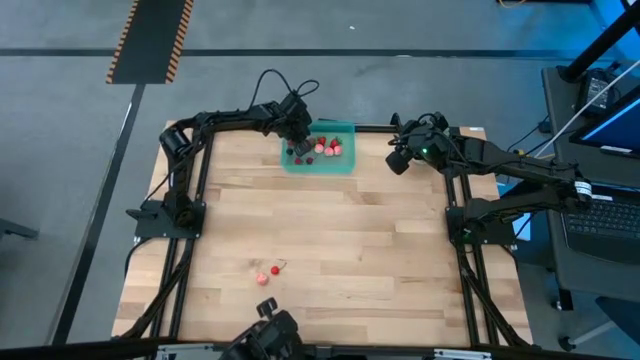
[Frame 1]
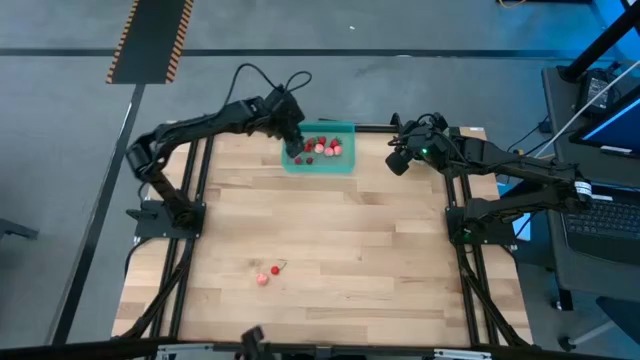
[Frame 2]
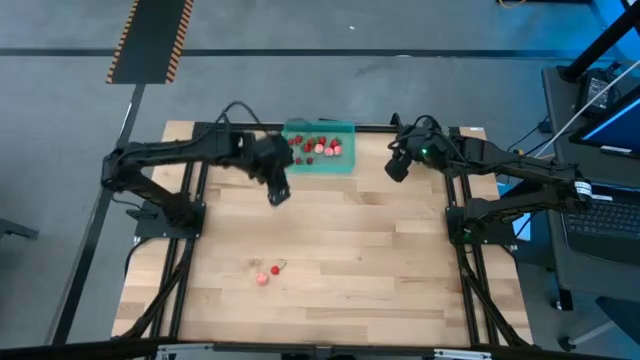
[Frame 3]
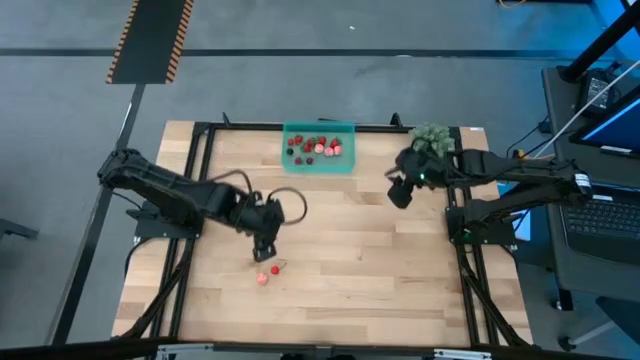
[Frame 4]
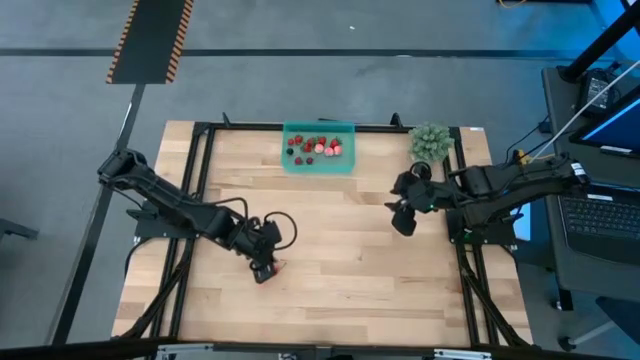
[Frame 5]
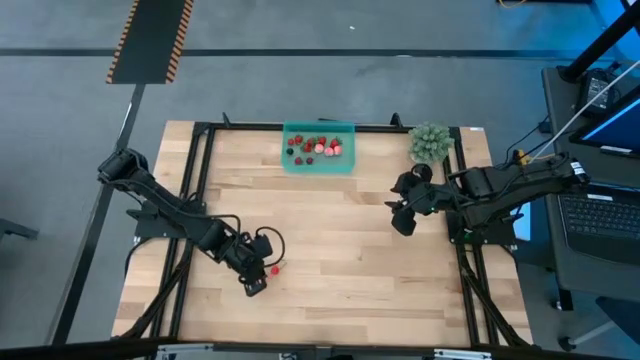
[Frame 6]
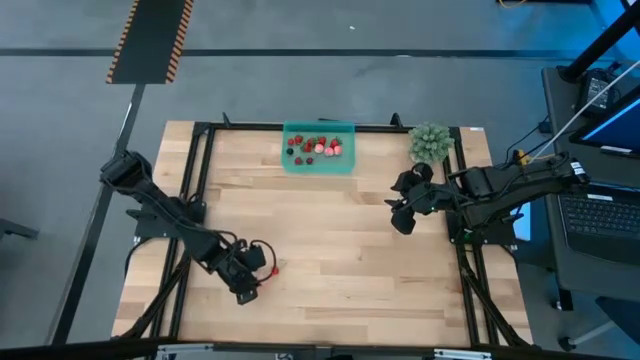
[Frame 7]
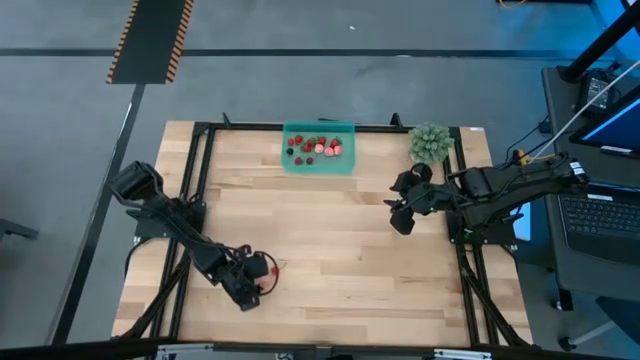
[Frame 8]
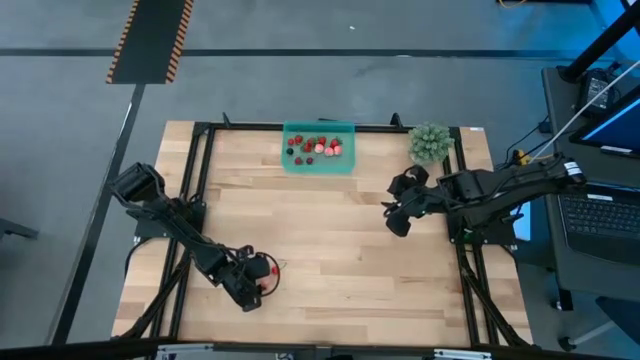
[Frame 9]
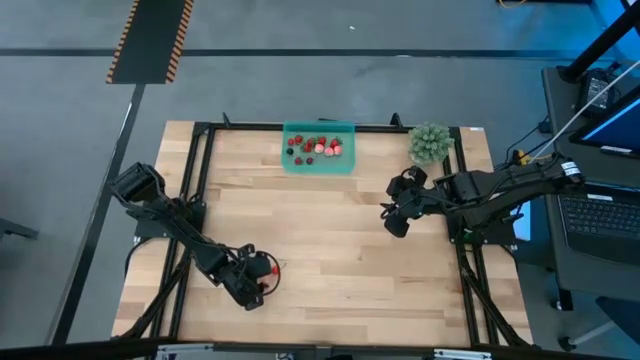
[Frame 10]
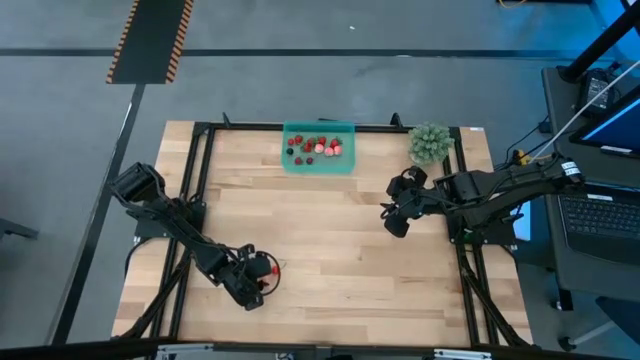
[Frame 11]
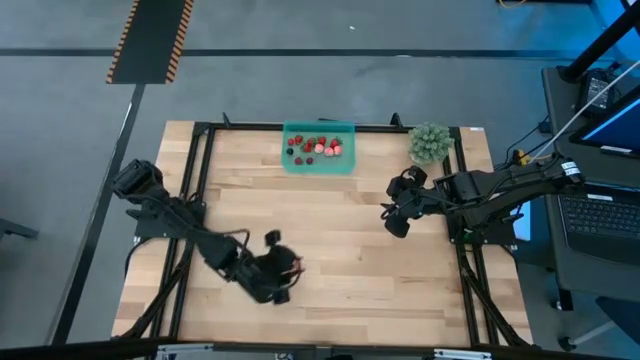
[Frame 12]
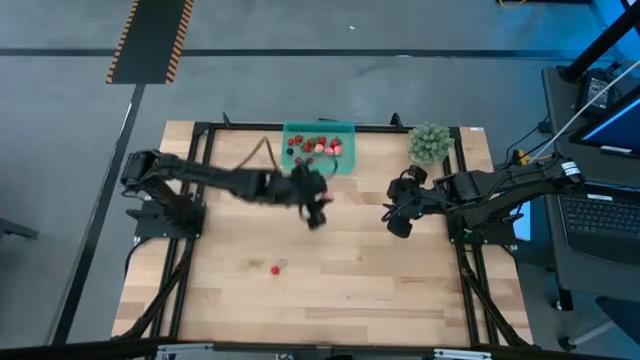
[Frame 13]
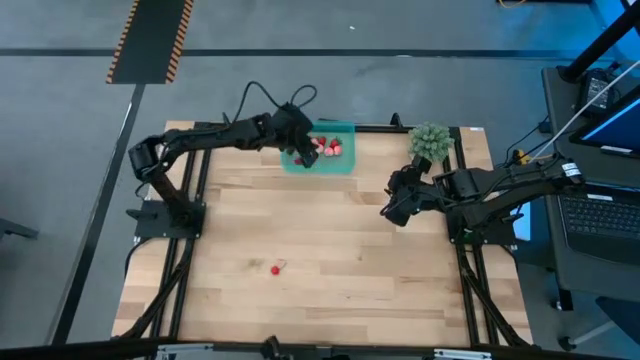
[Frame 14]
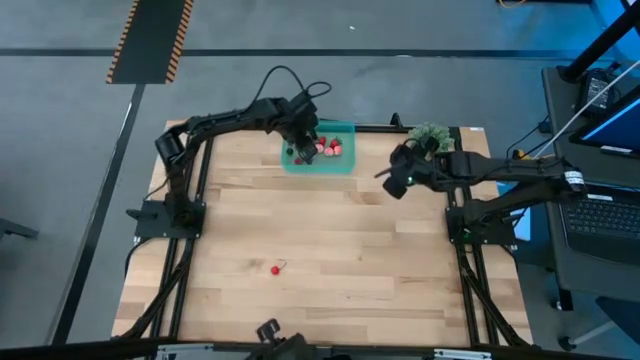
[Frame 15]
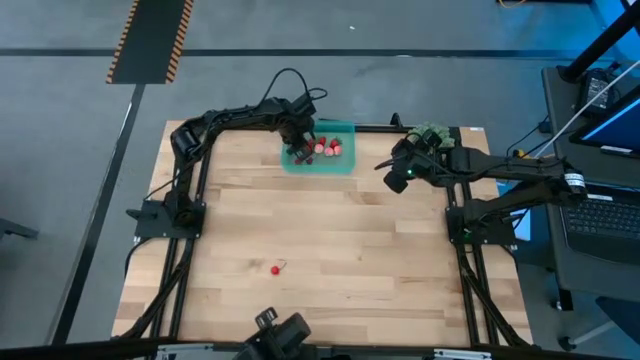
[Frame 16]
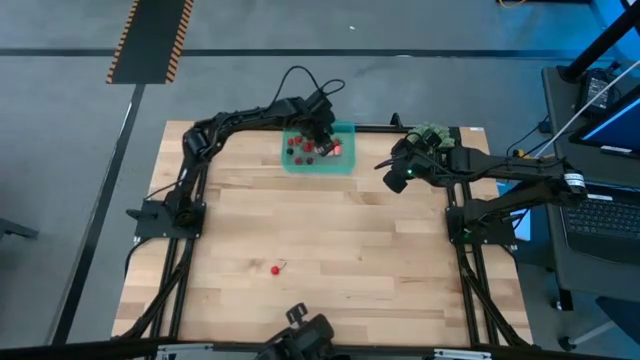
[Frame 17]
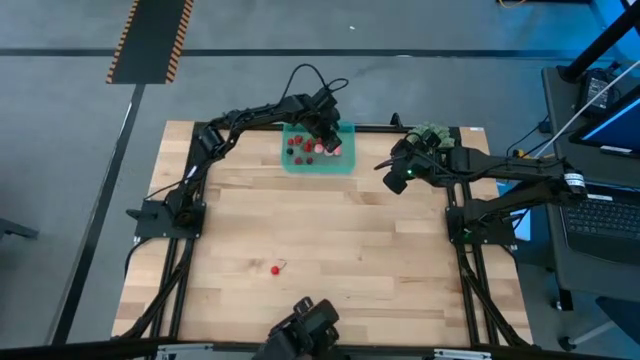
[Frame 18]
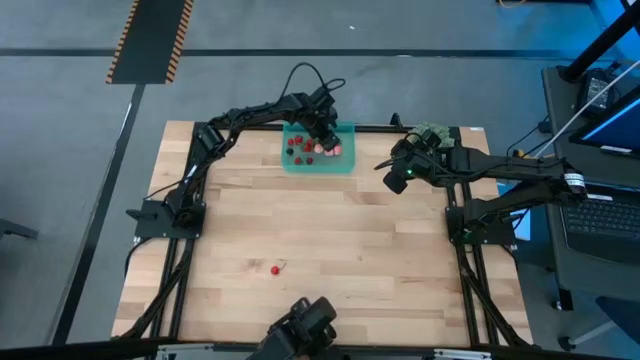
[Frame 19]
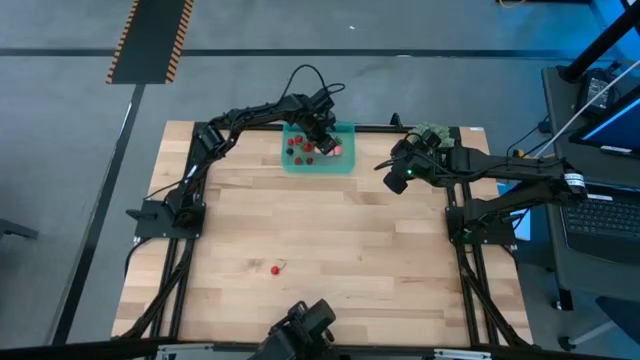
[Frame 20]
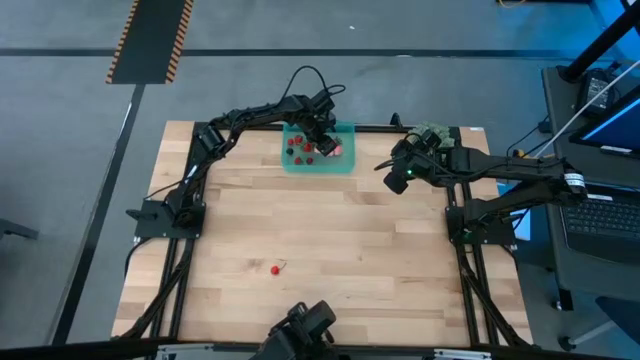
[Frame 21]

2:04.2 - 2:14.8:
Task: Pick and placing Produce into tupperware
Put the pink peach into the green container

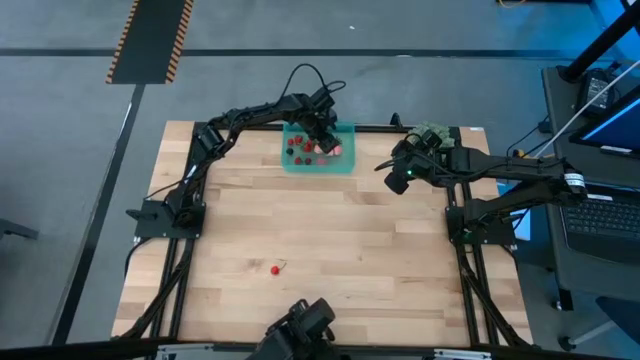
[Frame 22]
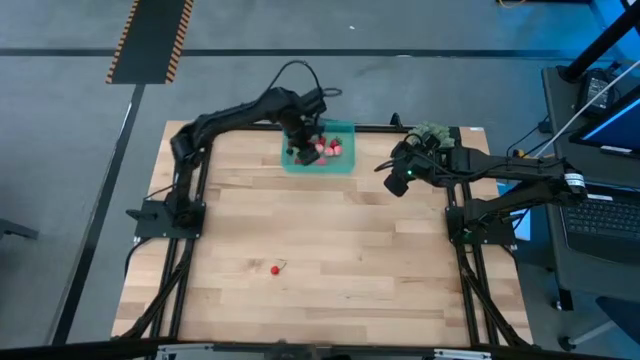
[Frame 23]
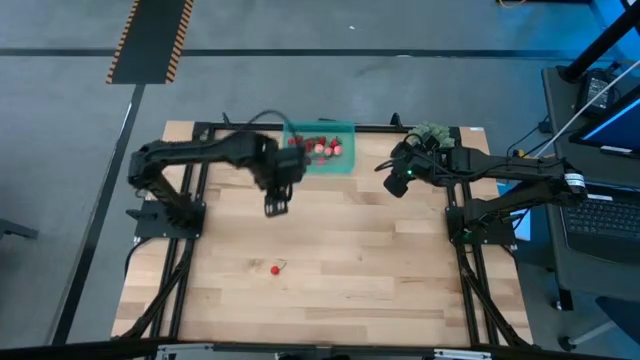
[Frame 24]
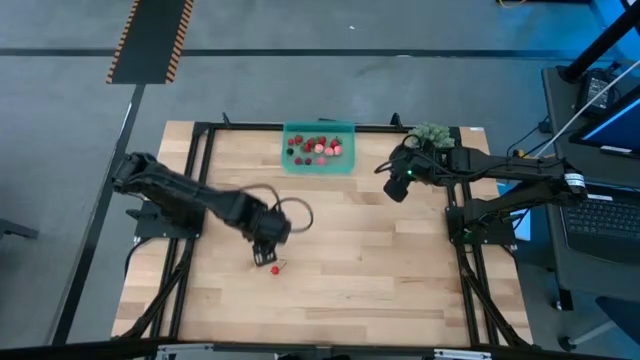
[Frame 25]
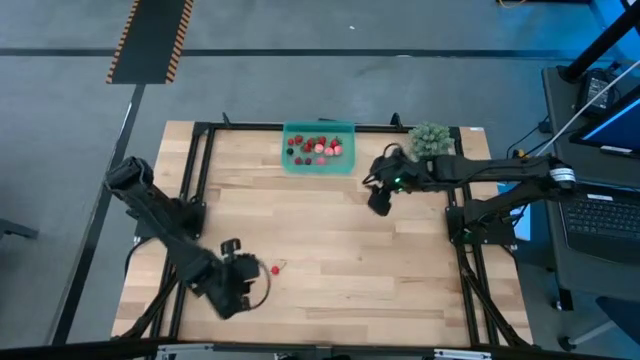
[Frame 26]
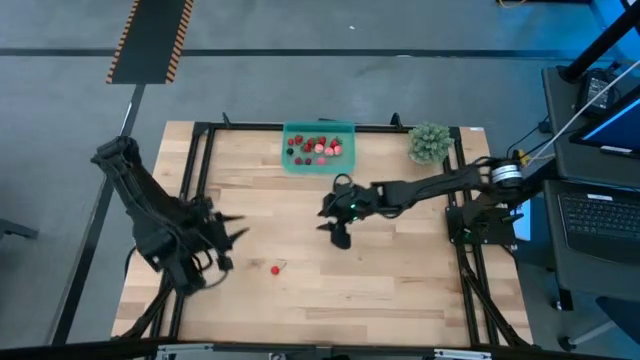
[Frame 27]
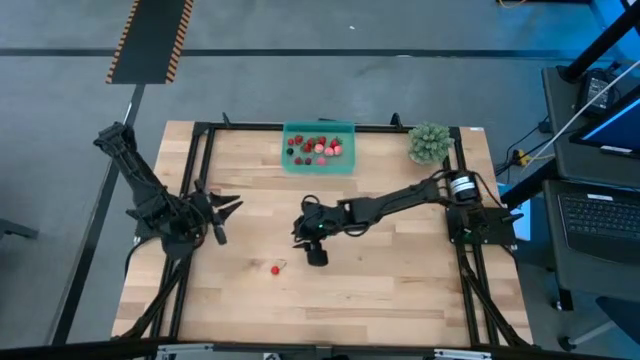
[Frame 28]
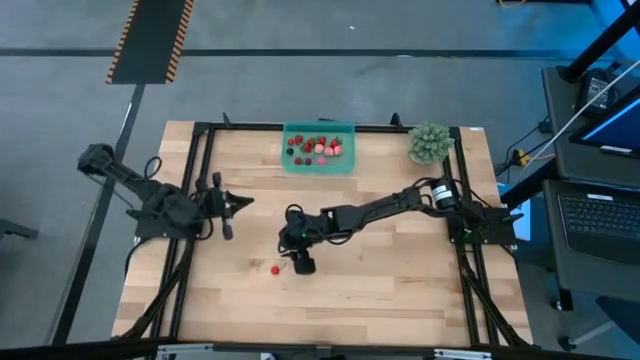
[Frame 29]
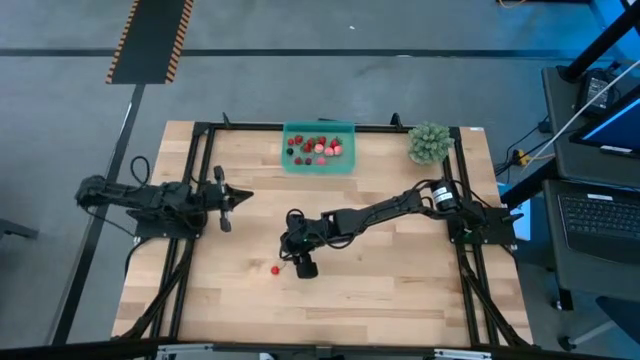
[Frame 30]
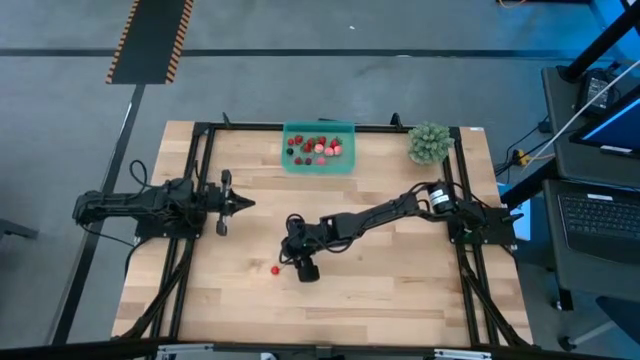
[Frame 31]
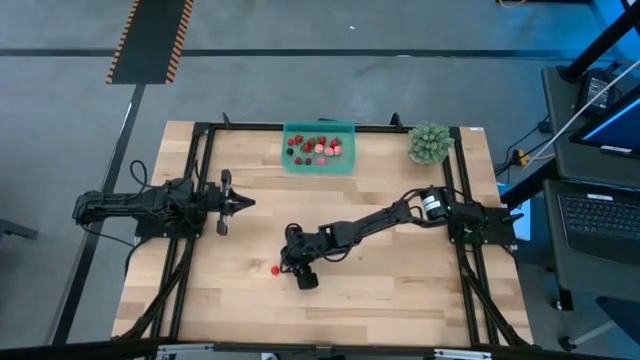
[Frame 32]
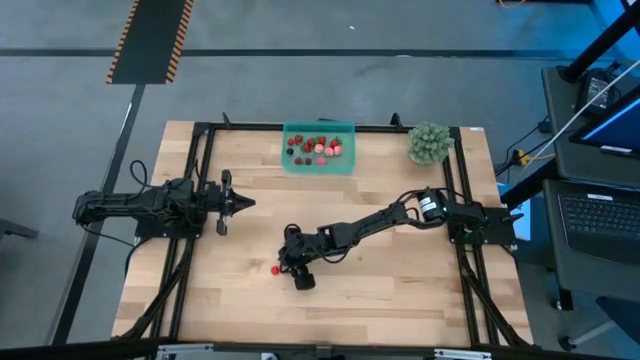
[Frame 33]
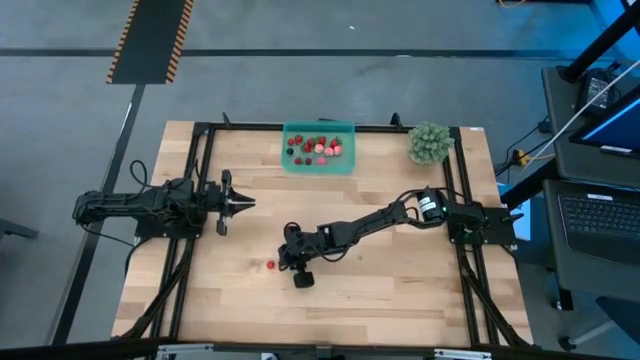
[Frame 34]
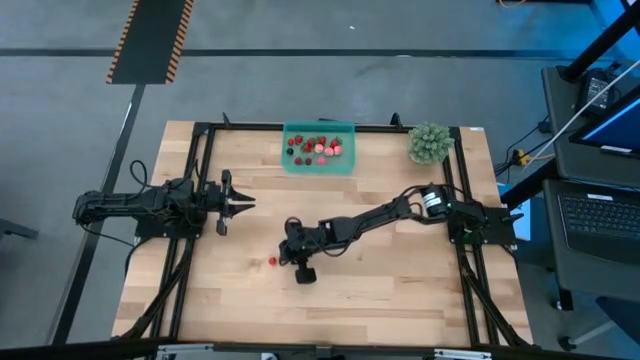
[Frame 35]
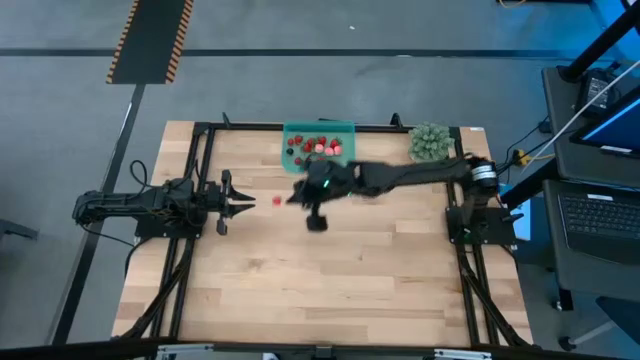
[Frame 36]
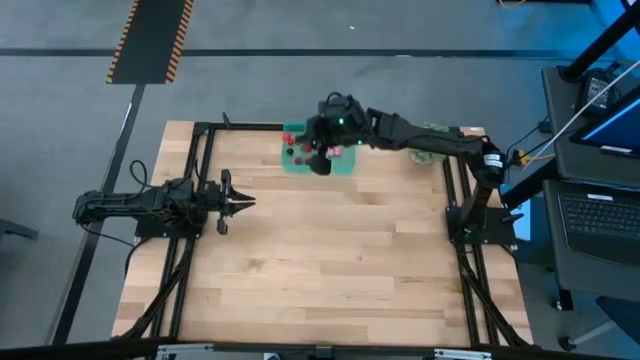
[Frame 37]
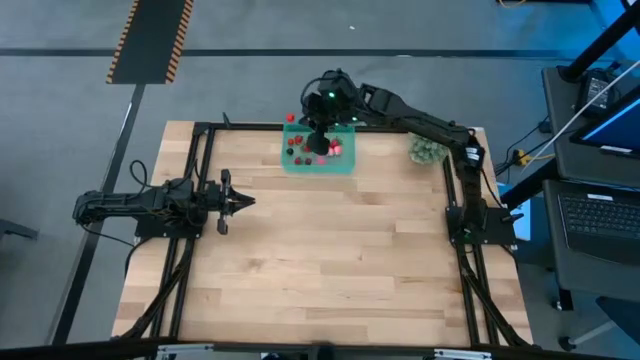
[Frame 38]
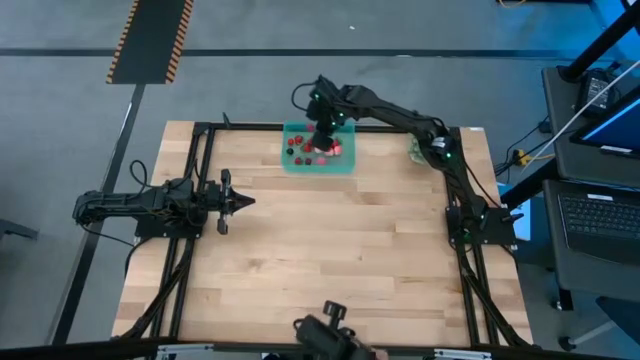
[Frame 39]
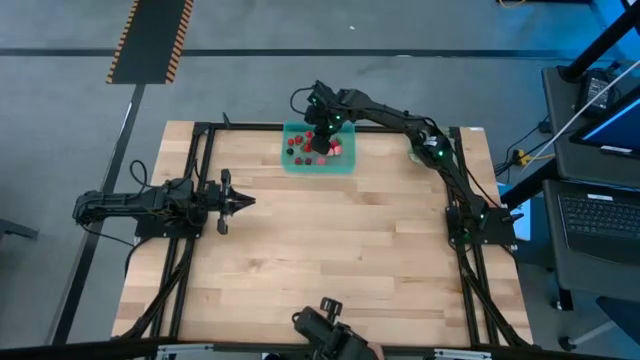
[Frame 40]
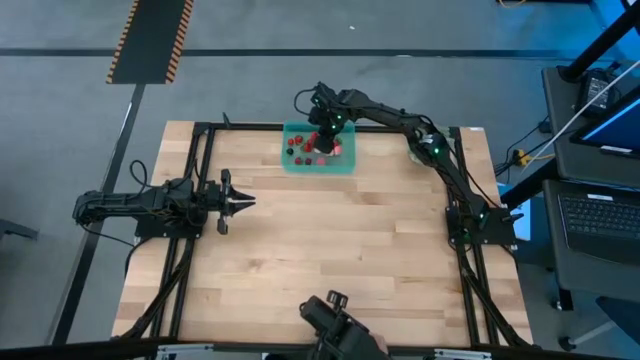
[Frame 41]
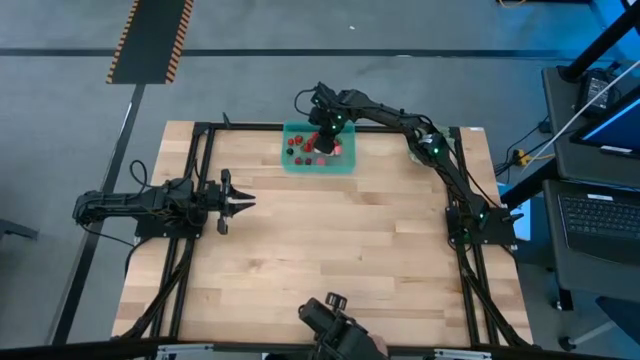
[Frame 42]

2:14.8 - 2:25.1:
Put the red cherry into the green container

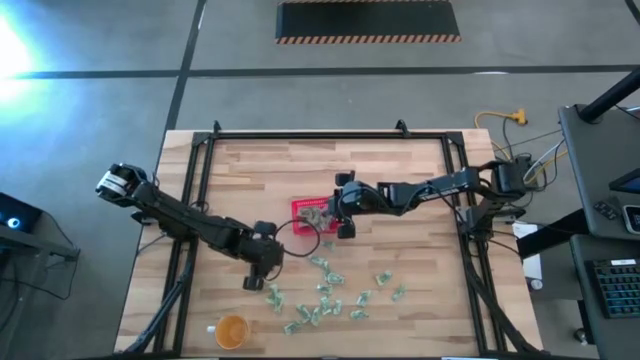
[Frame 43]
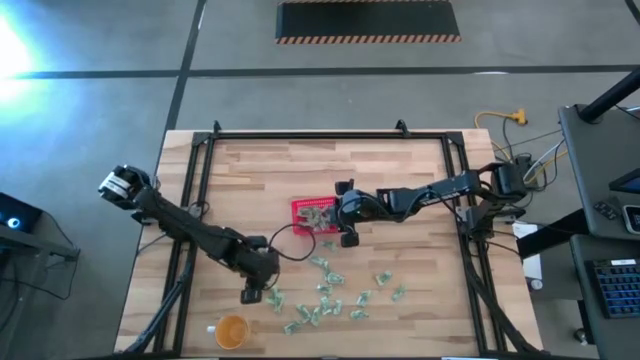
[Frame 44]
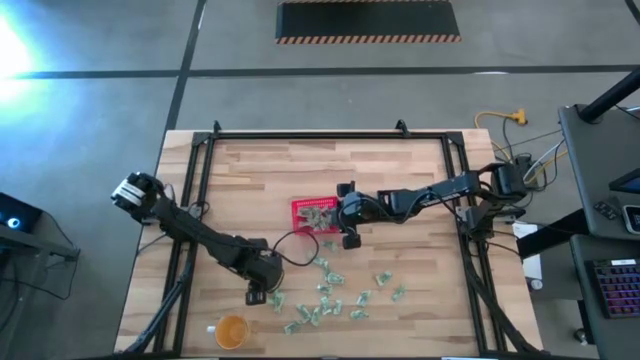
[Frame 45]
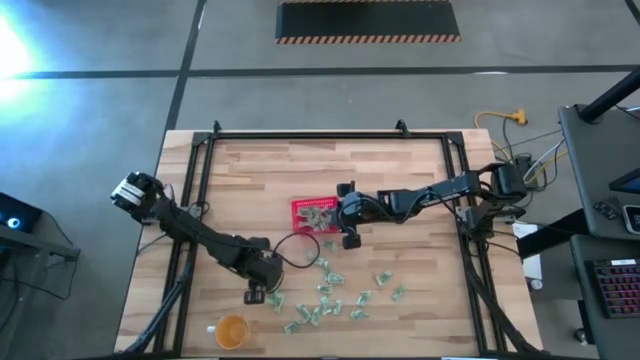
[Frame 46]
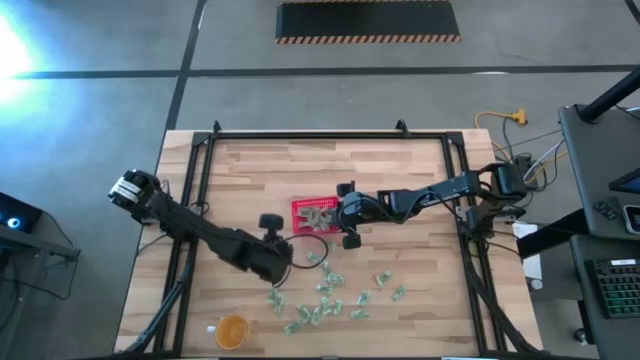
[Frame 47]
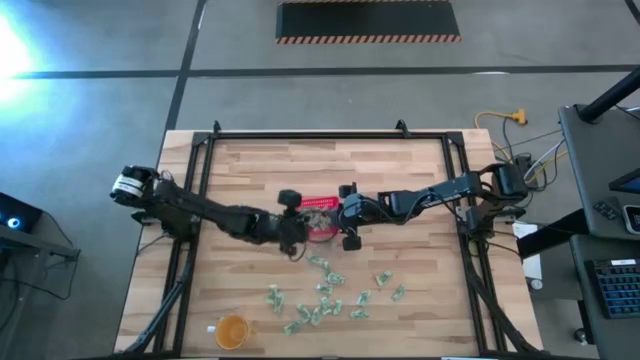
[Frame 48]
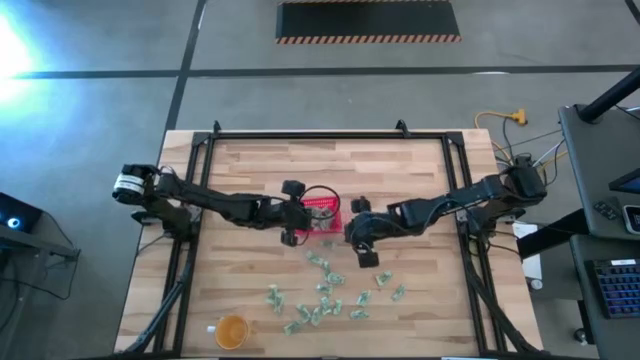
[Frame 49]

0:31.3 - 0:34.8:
Task: Pick and place items into bin
Put the stevia packet into the red bin
